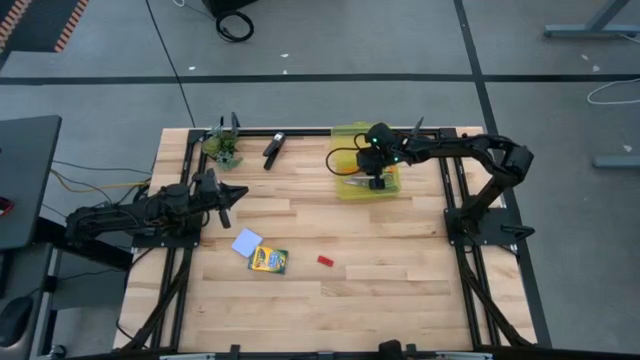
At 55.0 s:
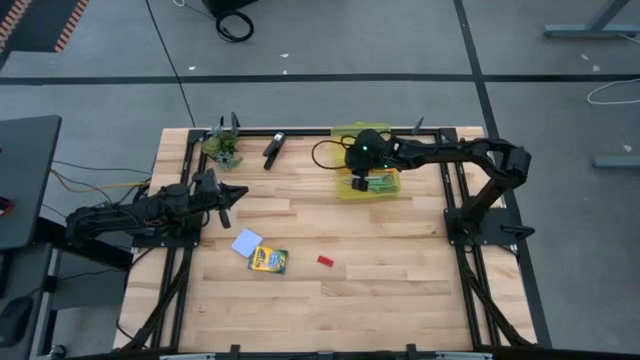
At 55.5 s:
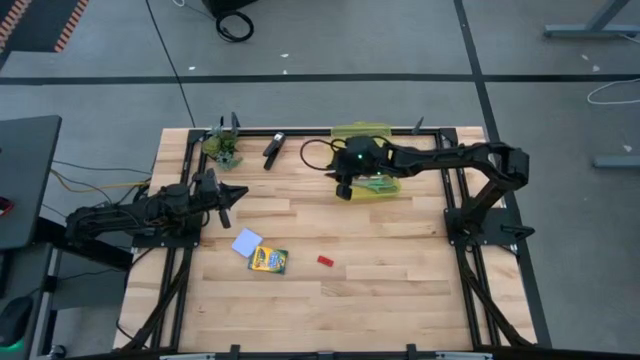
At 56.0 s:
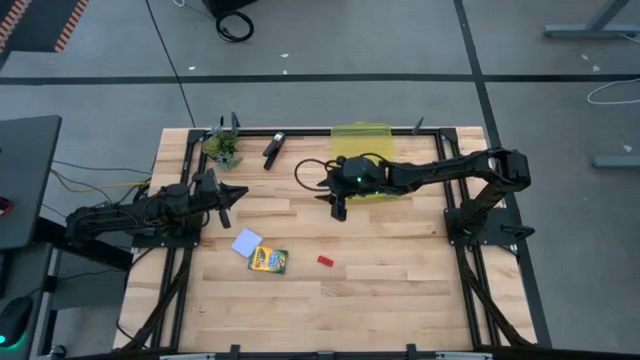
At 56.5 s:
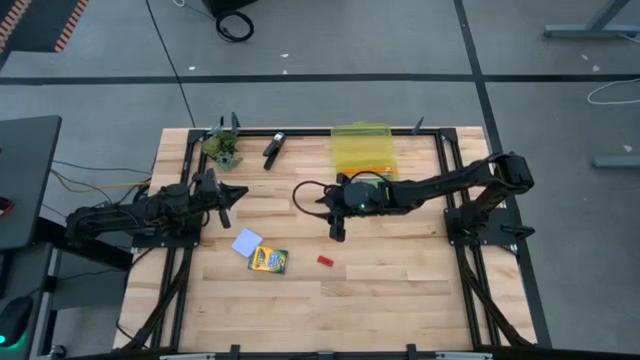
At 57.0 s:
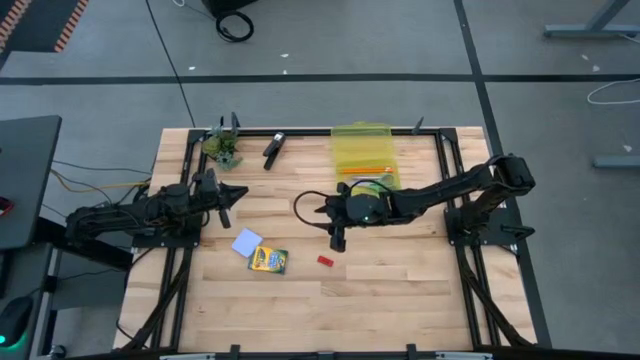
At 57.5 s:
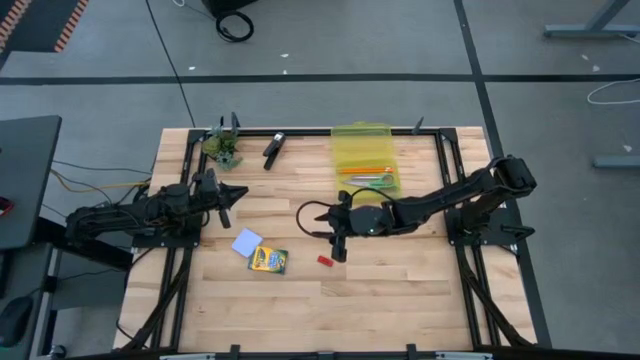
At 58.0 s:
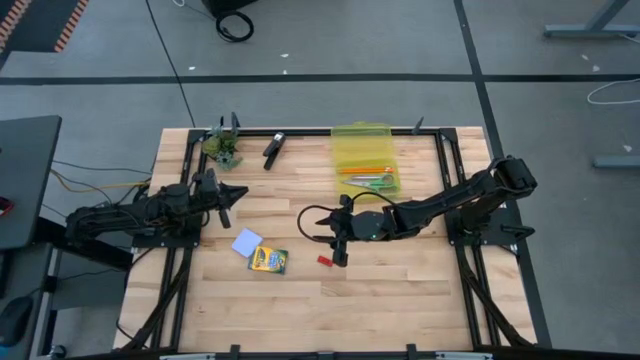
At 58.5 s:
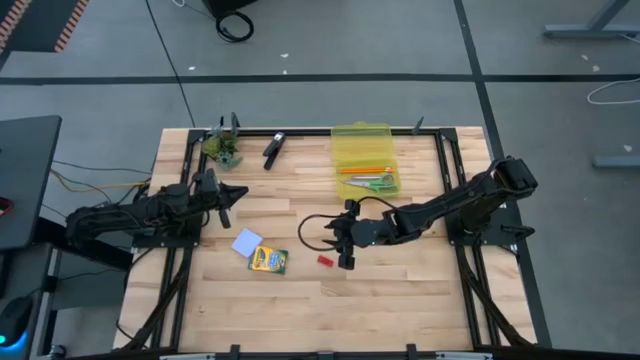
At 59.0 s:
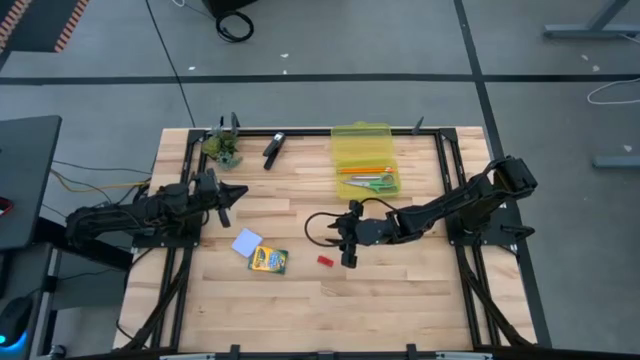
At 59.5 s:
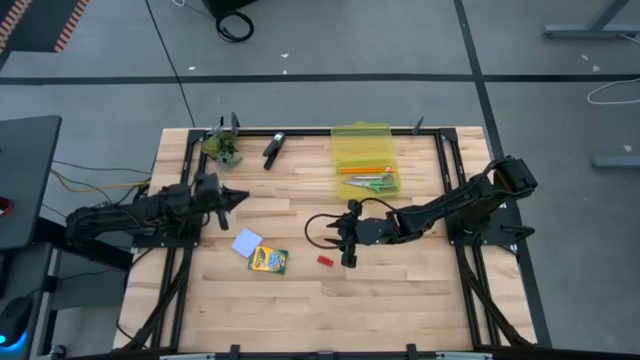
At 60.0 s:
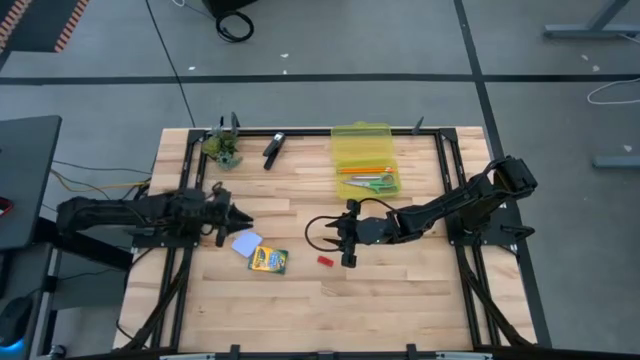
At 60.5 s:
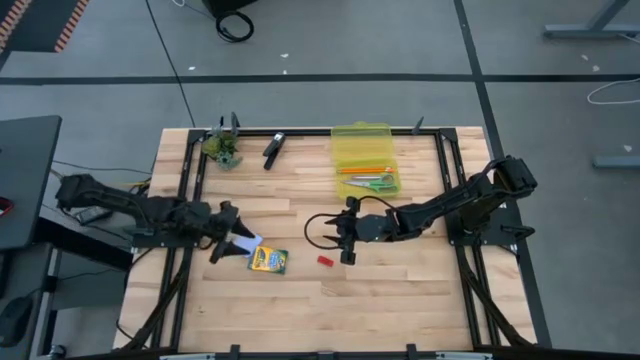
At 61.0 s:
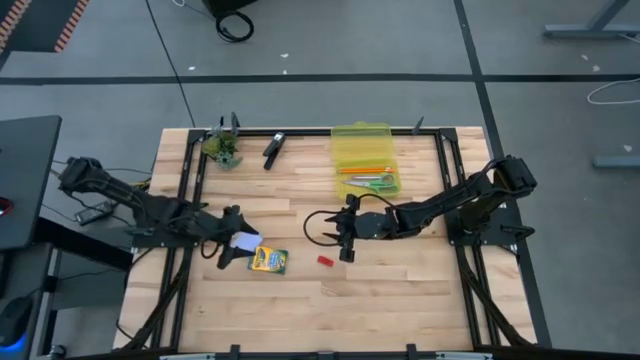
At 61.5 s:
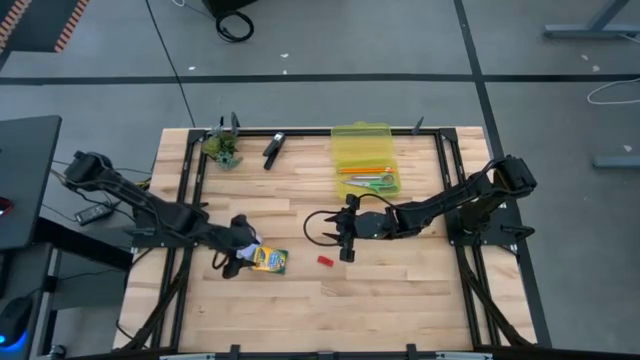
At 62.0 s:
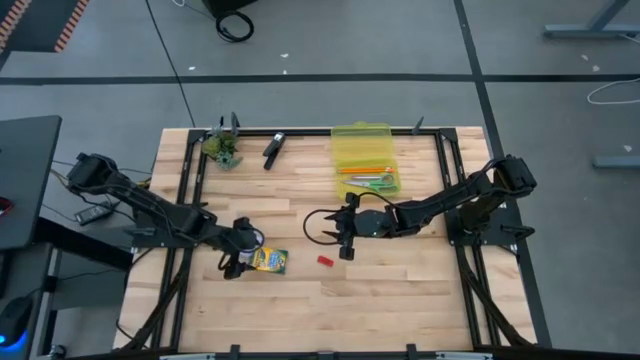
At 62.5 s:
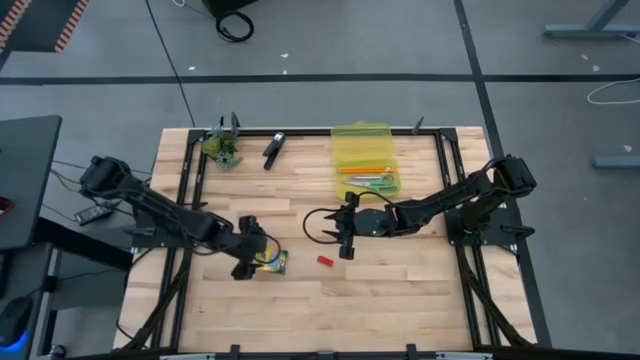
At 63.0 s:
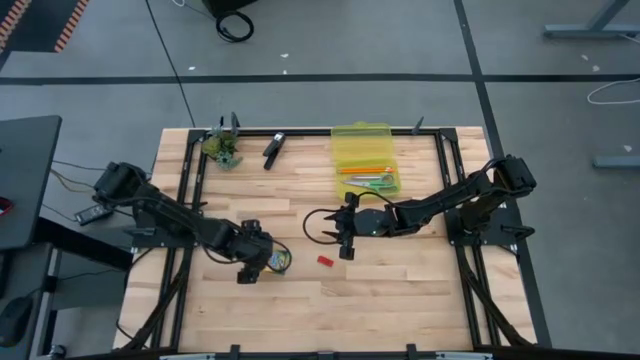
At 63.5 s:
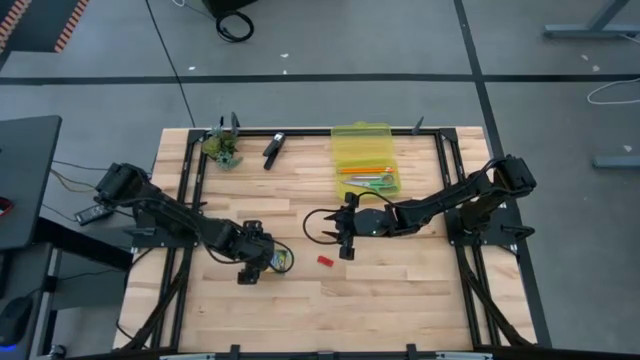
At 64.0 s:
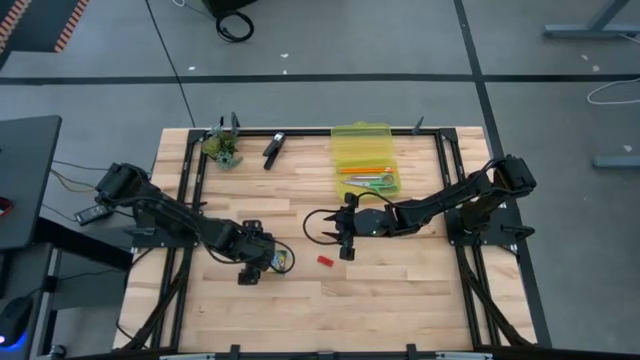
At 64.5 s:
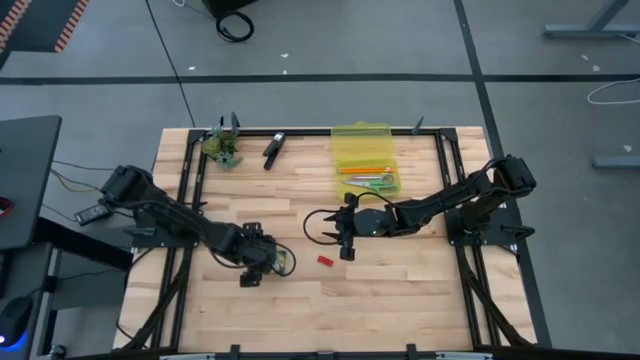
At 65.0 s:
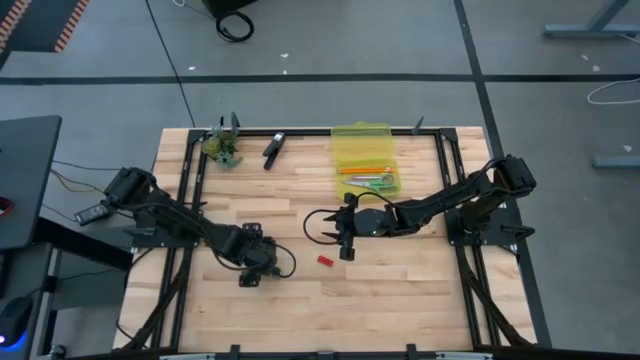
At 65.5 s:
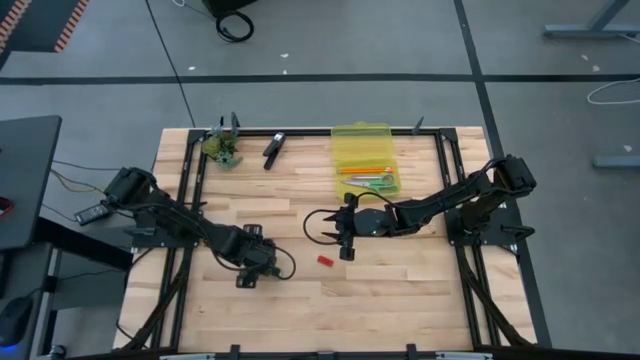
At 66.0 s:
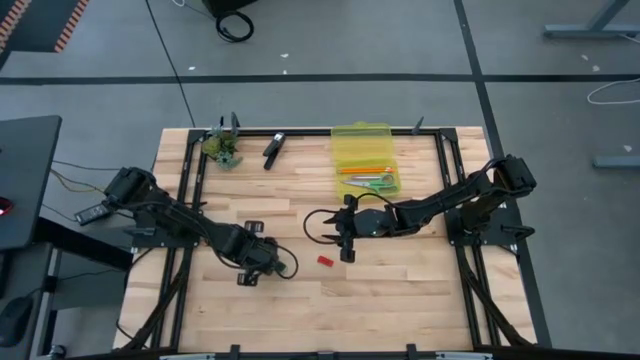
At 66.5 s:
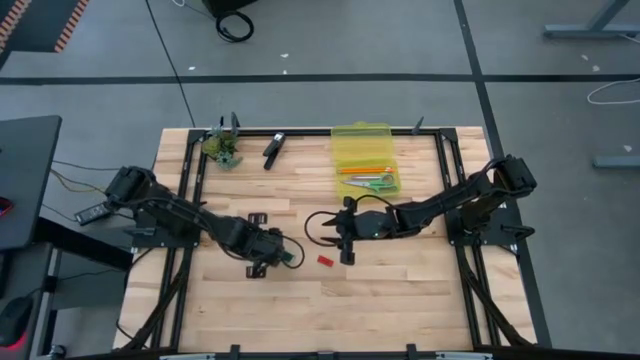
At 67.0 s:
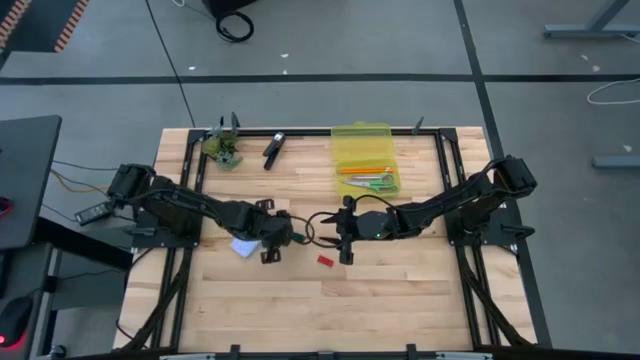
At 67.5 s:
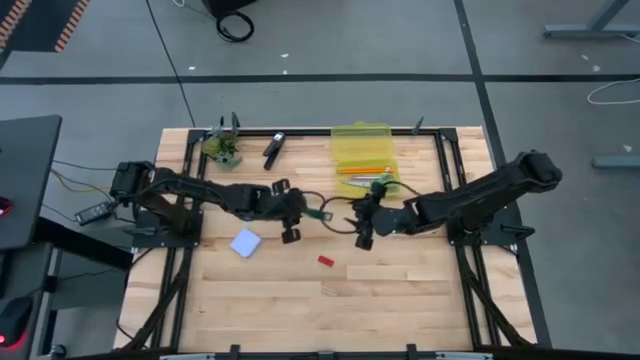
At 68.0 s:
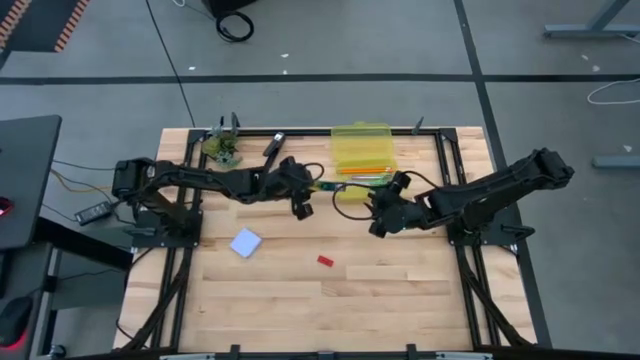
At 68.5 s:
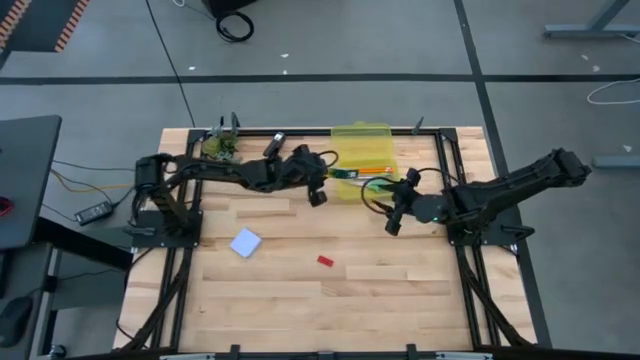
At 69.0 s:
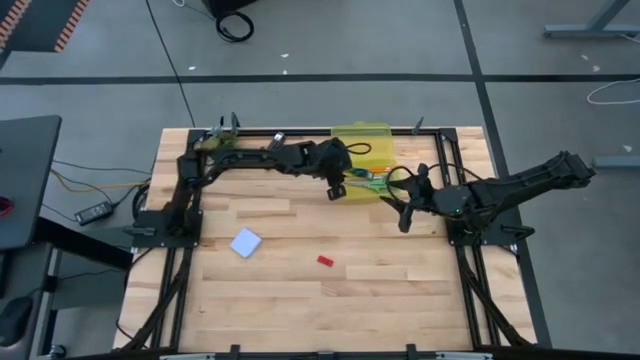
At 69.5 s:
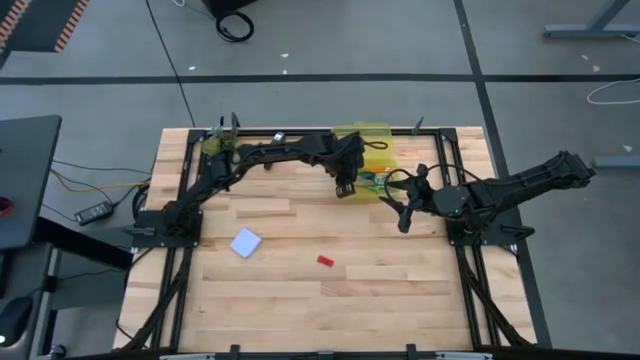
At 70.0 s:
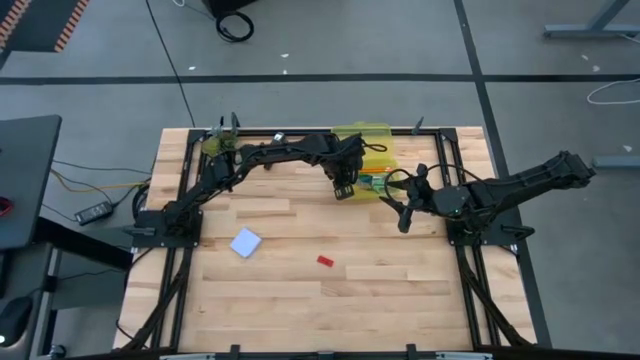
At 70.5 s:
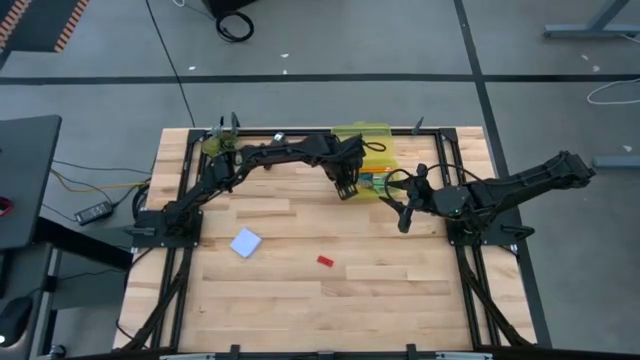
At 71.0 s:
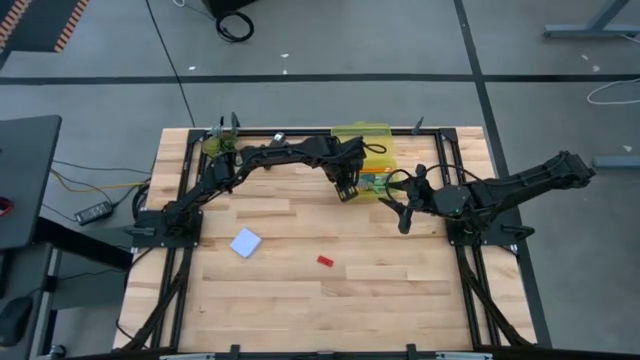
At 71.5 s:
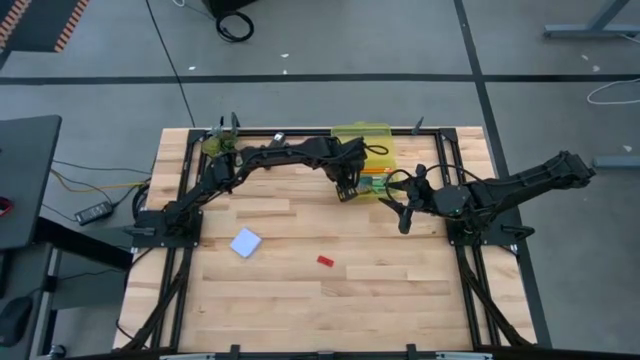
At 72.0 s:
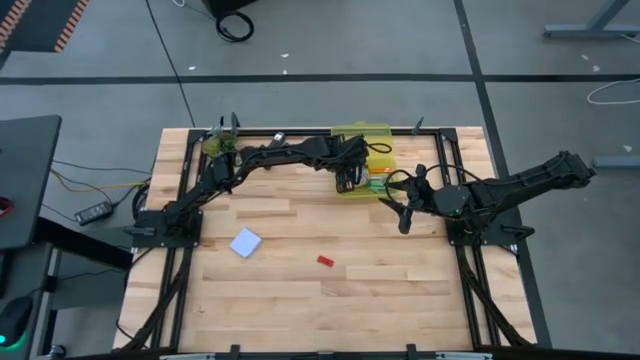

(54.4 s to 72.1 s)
Task: Pack school essentials
Put the crayon box into the yellow supply box

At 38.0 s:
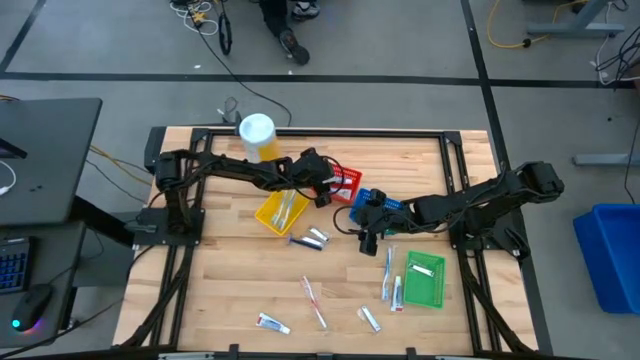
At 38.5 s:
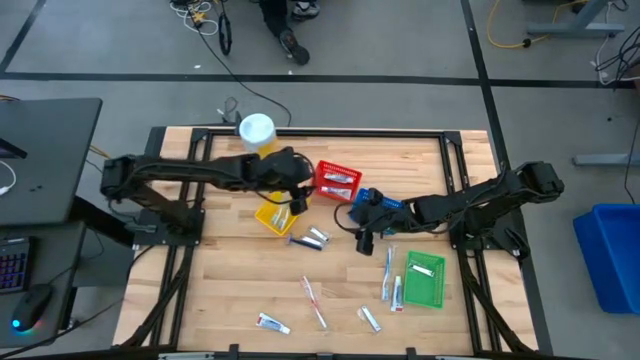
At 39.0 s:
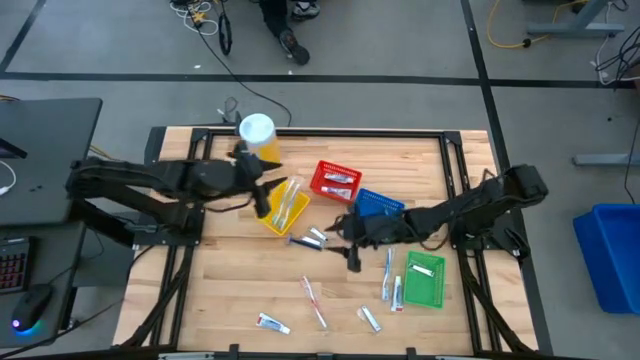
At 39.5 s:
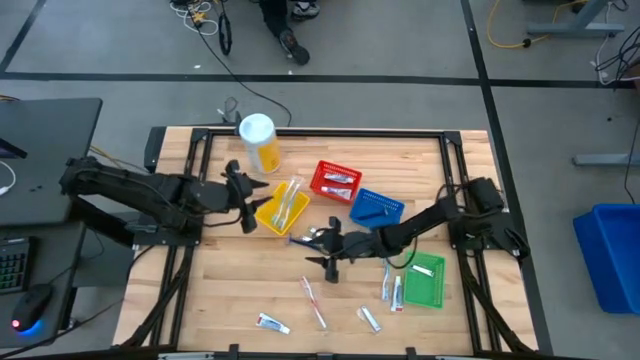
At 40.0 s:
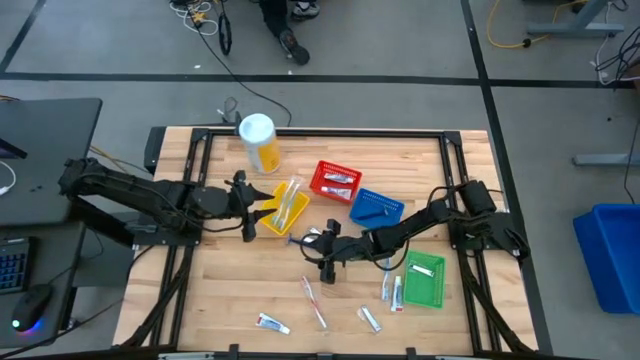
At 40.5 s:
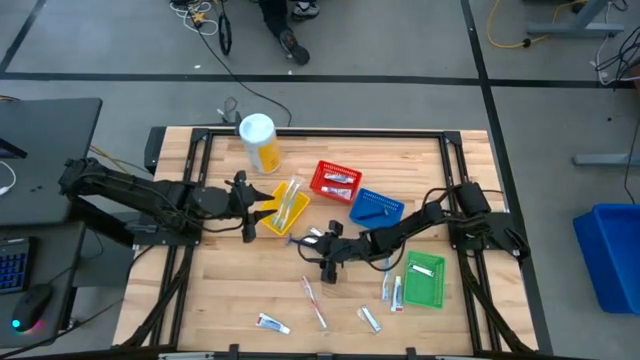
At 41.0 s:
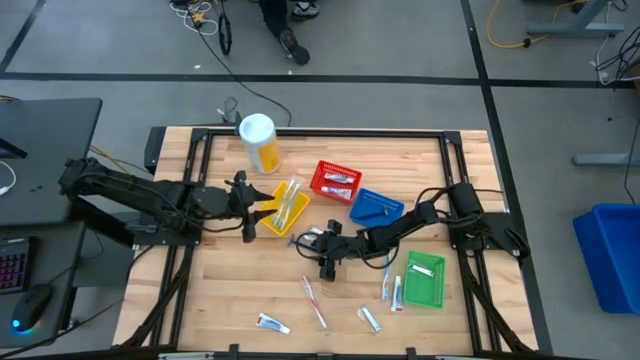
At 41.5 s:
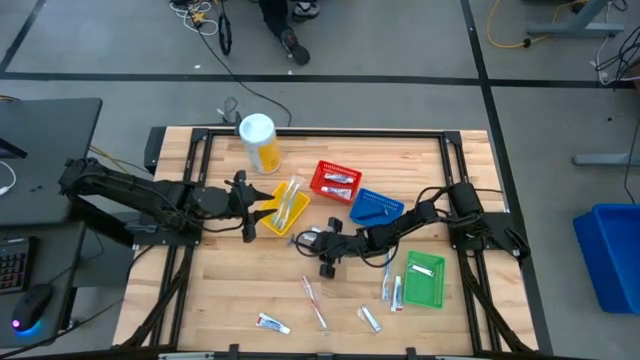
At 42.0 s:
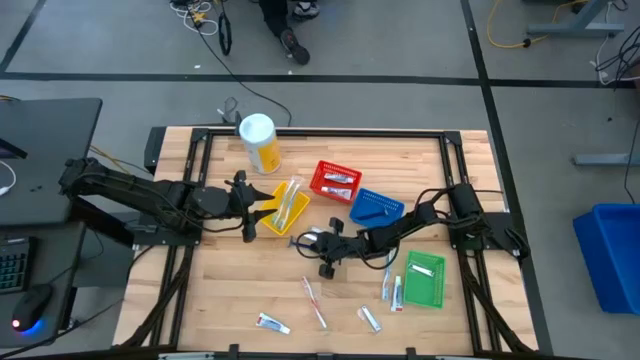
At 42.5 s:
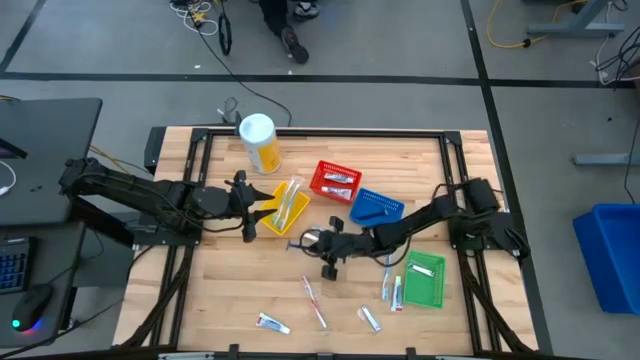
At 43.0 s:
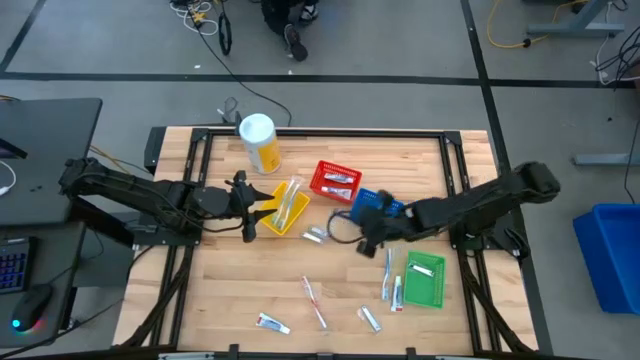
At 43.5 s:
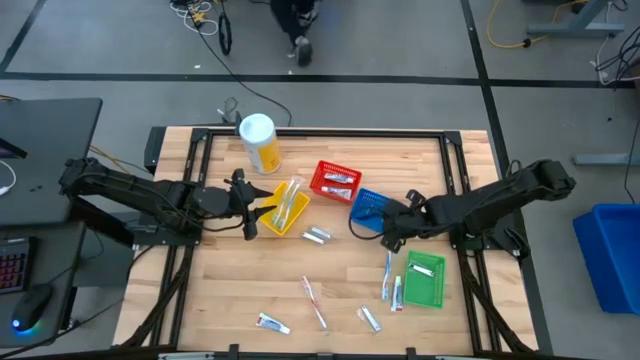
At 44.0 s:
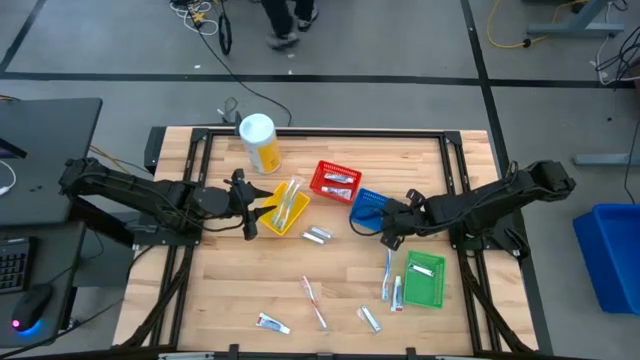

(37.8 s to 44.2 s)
Task: Pick & Place Travel size toiletries
Put the blue razor into the blue bin
